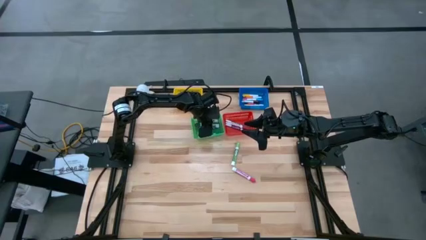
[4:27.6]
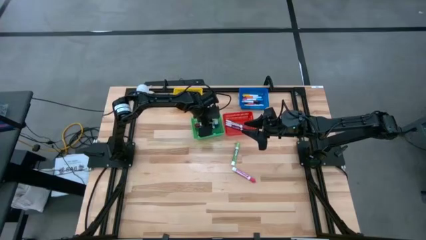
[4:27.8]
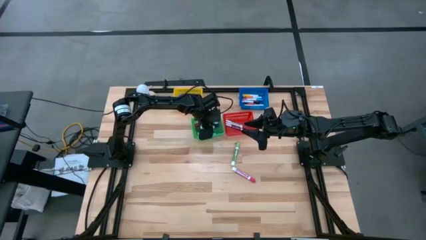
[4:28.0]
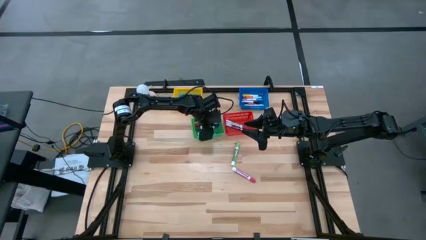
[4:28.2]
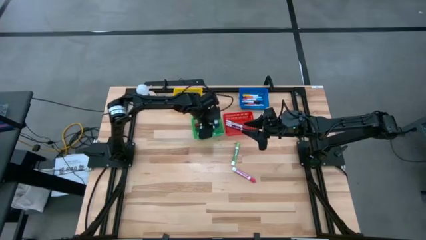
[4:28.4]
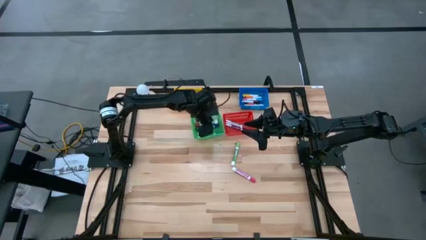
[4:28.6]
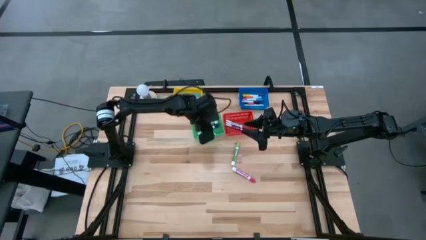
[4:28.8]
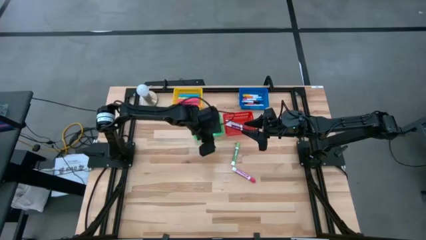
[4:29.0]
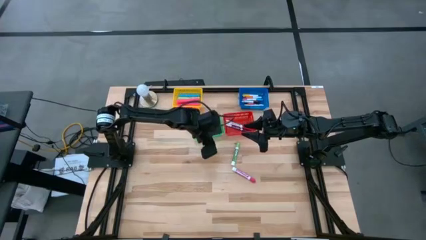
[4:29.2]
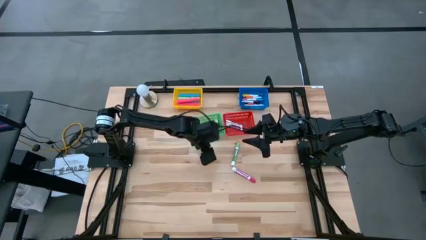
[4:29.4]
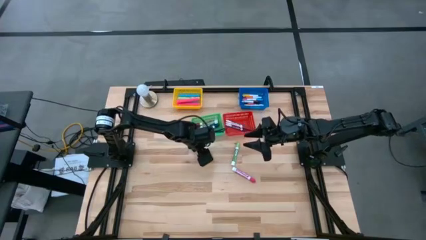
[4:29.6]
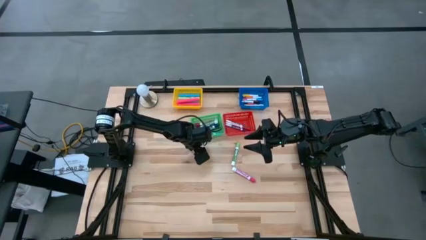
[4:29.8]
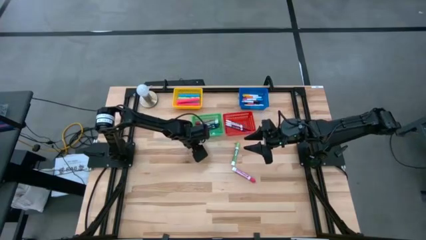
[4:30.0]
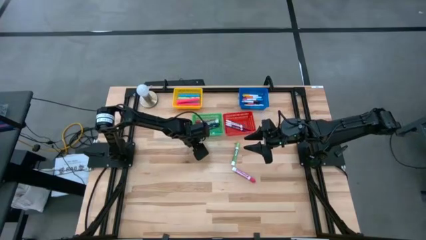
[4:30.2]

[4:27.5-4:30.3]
Task: Pick & Place Markers
Adjust the green bin

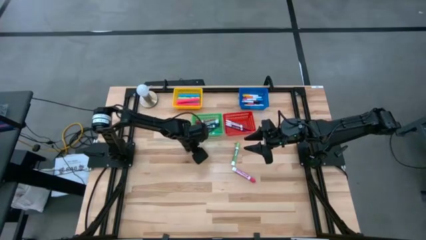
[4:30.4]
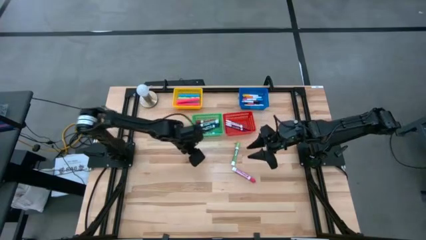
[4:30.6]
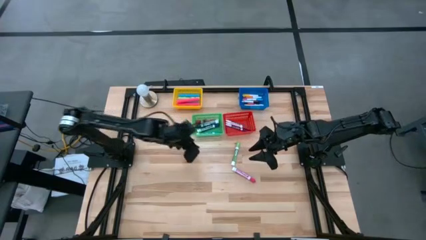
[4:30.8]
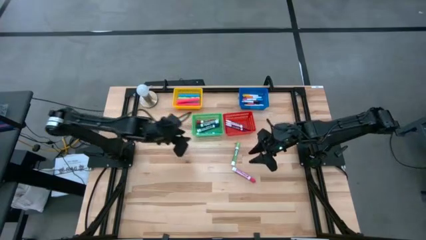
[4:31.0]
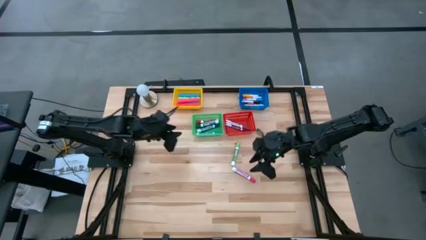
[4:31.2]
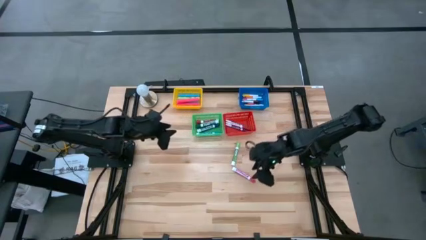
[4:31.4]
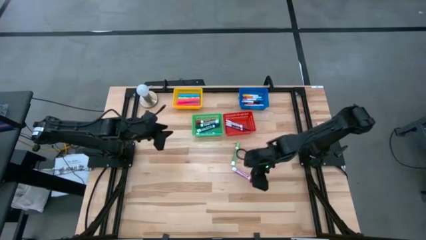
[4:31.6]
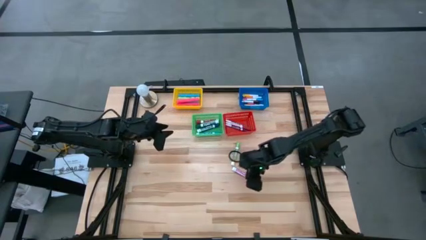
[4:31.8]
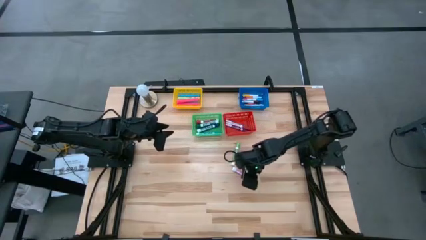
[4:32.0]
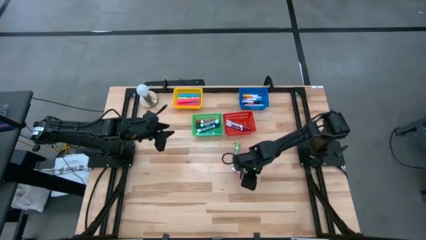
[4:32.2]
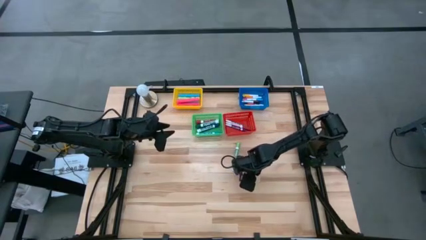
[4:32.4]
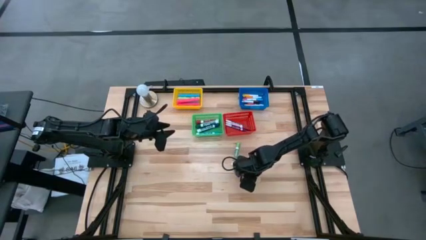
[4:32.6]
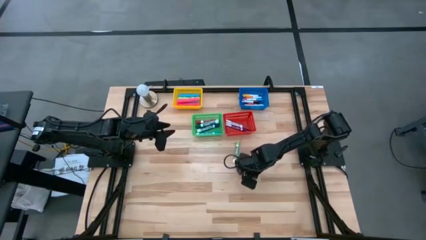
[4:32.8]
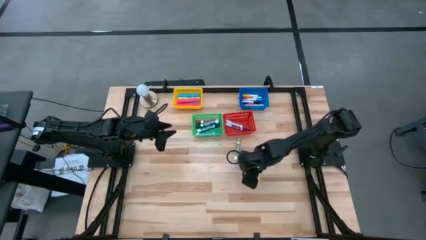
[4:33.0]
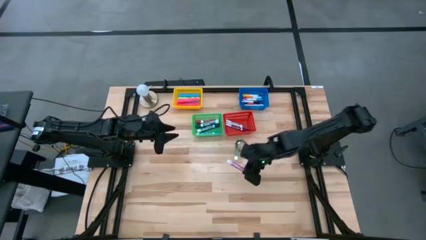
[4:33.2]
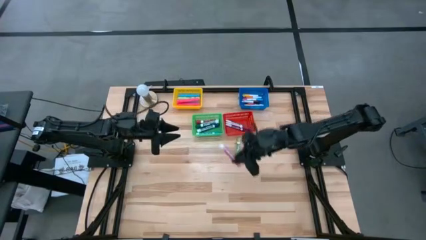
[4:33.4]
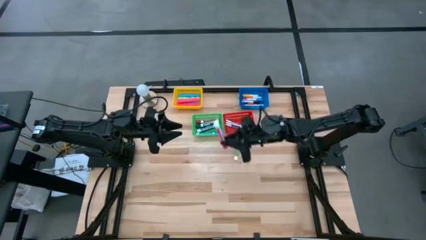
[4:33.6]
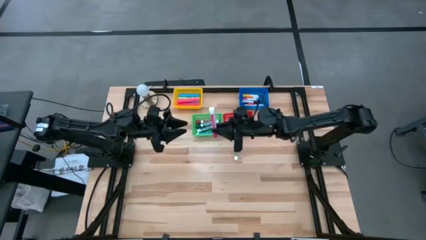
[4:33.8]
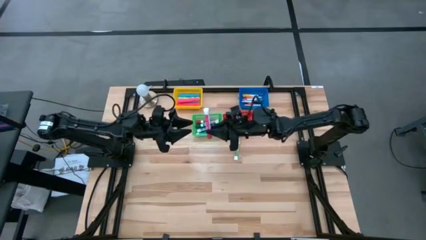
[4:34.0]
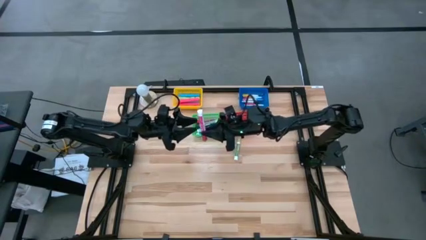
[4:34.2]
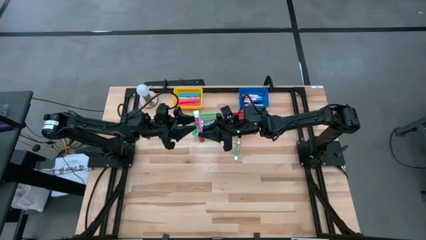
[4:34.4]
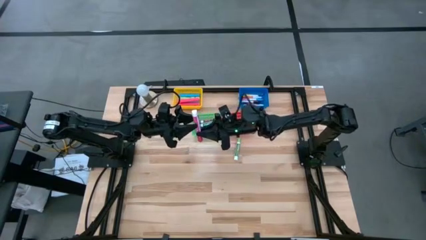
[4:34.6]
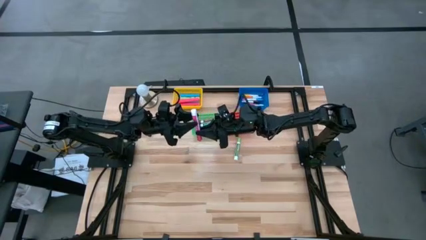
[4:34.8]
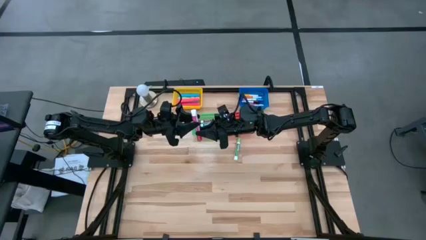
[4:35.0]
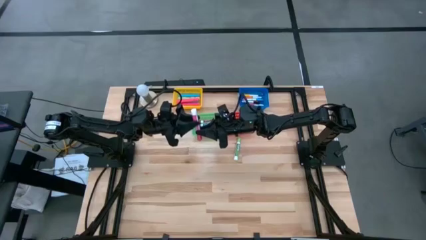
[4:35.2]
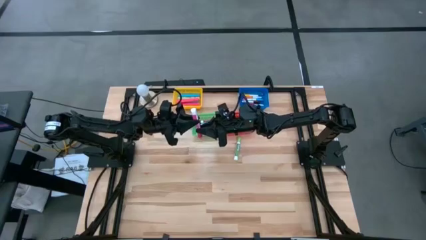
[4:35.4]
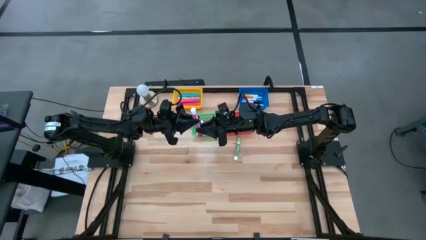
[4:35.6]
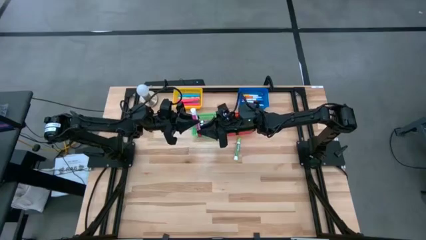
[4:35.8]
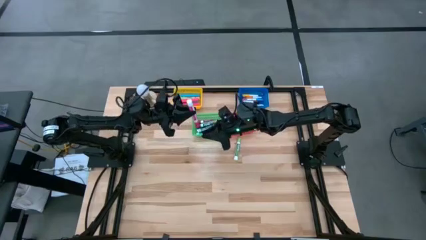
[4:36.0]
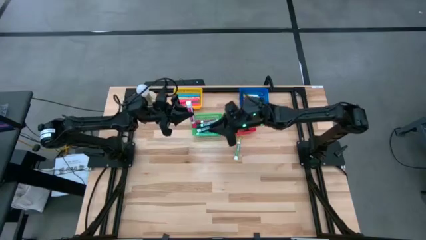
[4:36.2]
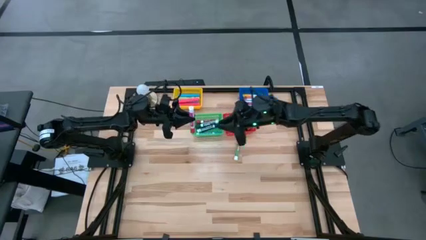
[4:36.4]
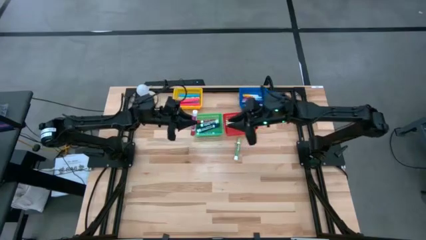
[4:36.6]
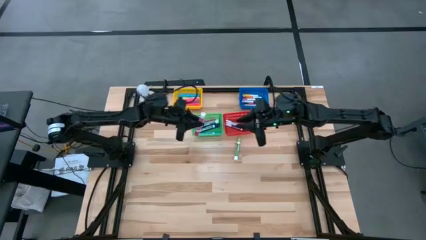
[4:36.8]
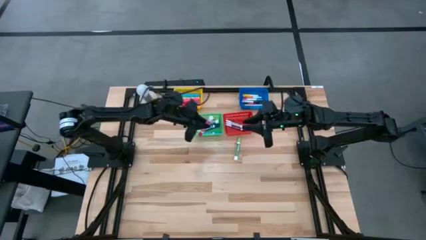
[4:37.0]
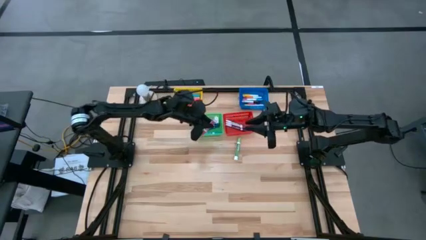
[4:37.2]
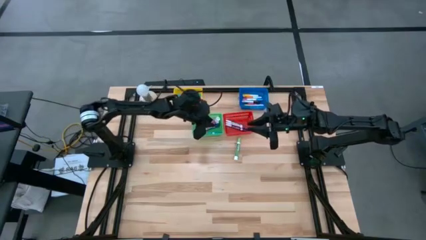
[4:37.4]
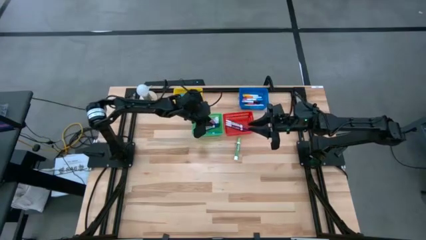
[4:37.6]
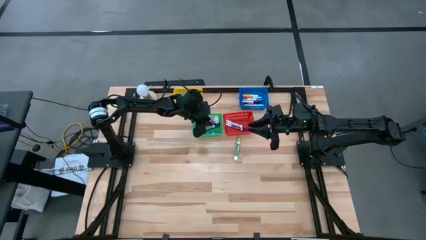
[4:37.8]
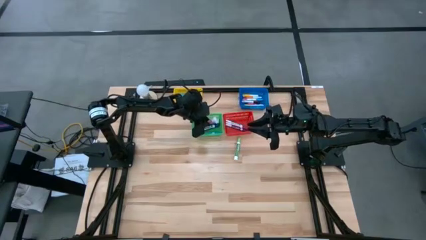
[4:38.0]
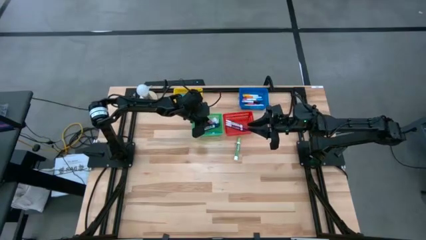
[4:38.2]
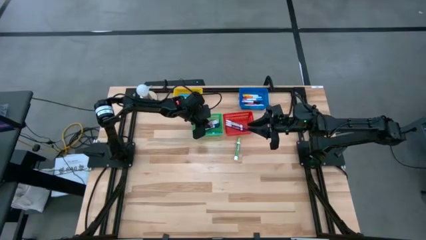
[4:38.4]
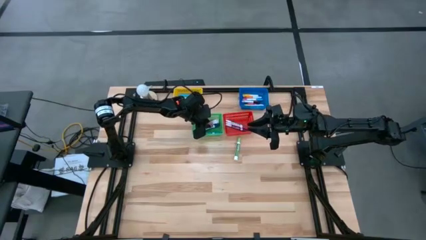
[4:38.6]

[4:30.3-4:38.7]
Put the large pink marker into the green bin

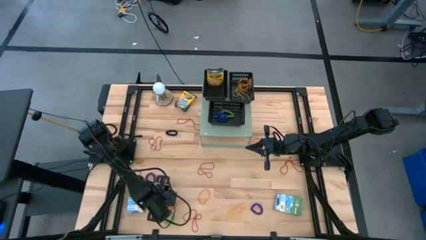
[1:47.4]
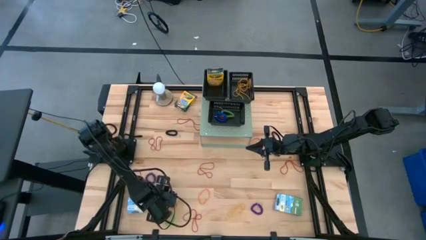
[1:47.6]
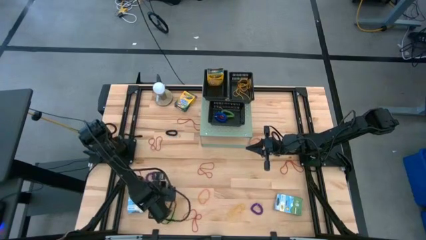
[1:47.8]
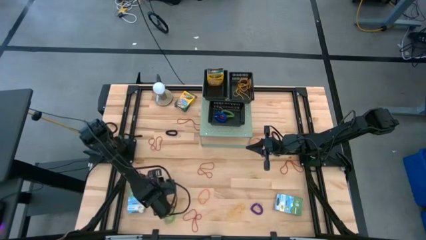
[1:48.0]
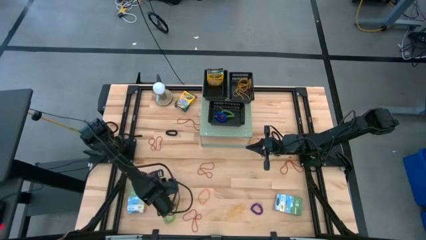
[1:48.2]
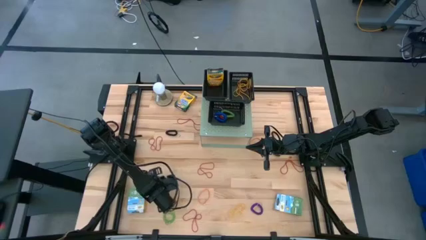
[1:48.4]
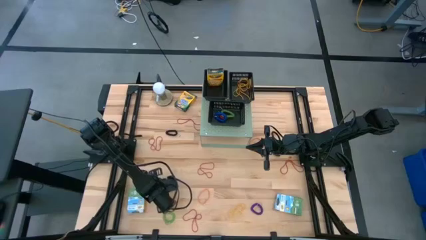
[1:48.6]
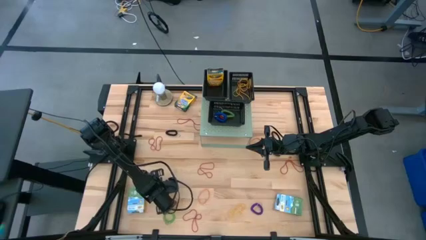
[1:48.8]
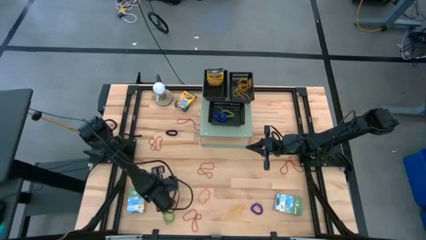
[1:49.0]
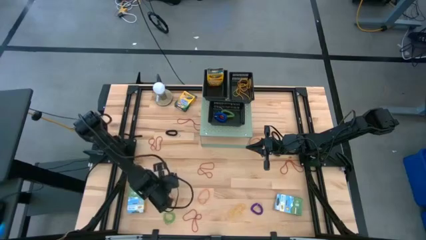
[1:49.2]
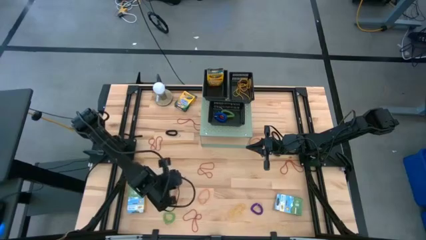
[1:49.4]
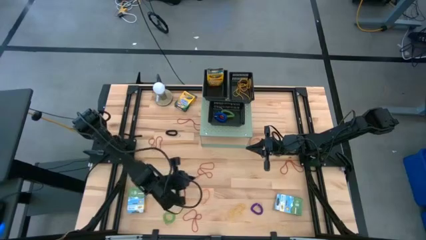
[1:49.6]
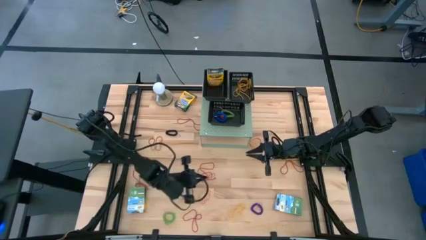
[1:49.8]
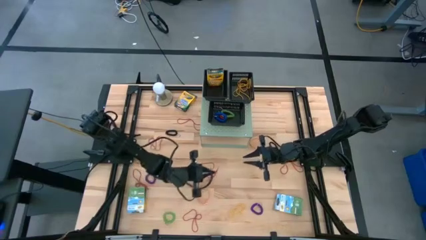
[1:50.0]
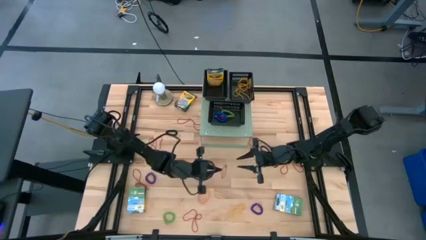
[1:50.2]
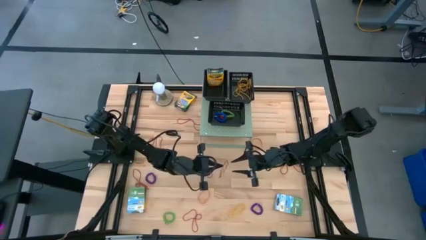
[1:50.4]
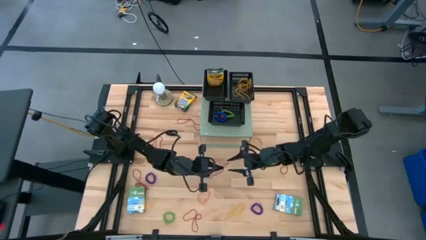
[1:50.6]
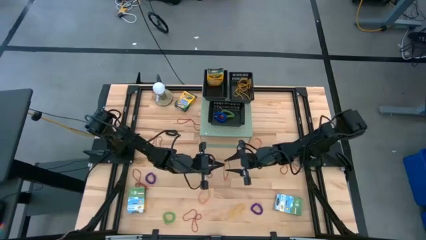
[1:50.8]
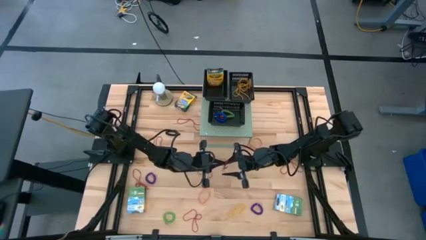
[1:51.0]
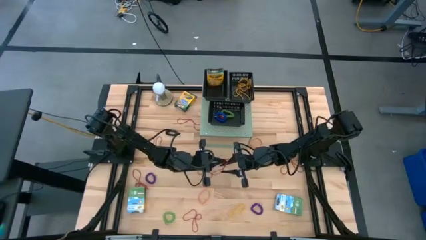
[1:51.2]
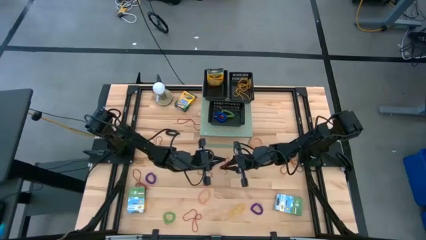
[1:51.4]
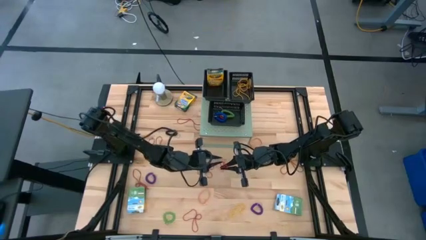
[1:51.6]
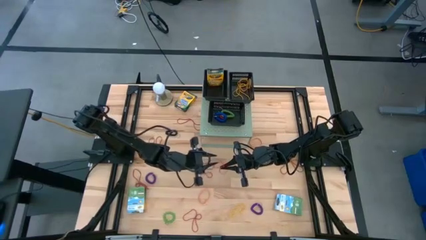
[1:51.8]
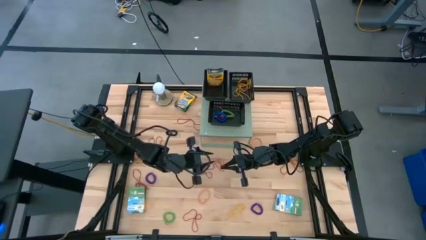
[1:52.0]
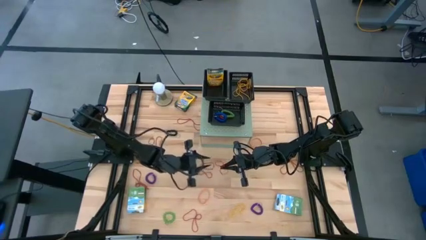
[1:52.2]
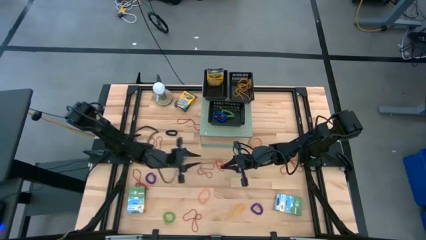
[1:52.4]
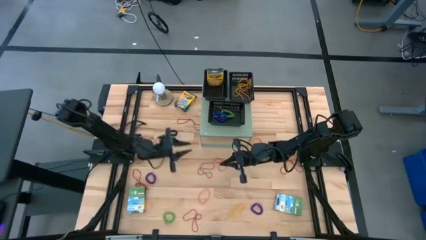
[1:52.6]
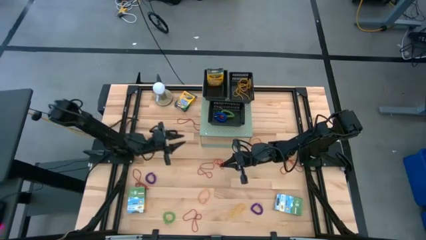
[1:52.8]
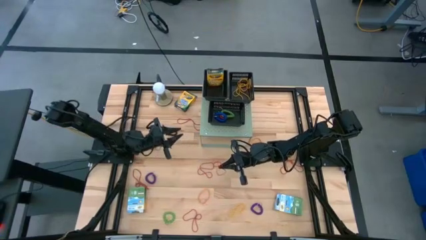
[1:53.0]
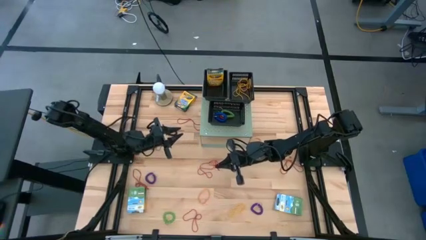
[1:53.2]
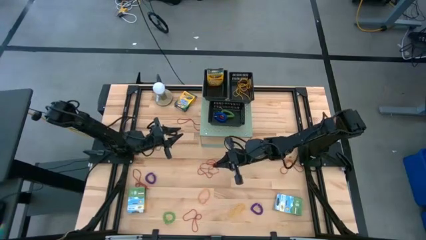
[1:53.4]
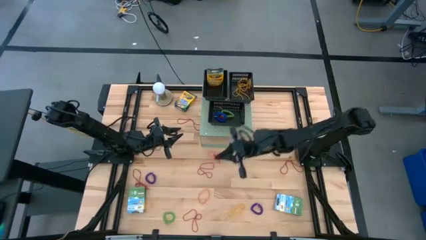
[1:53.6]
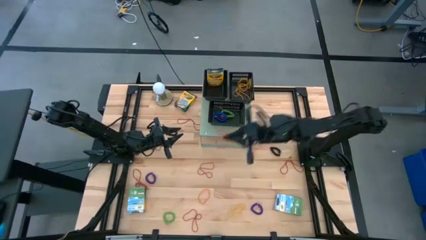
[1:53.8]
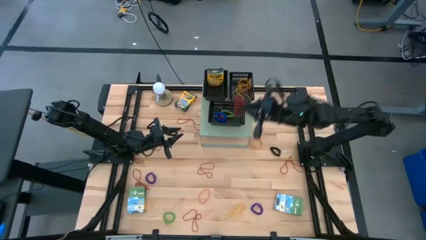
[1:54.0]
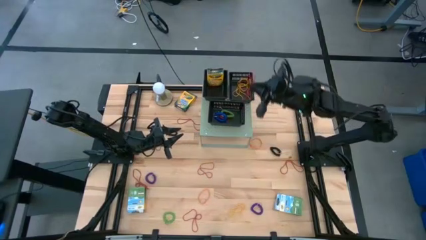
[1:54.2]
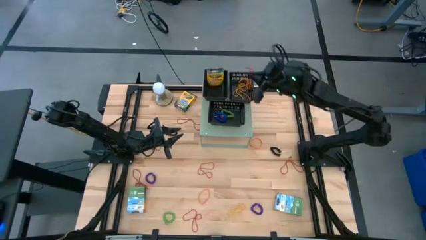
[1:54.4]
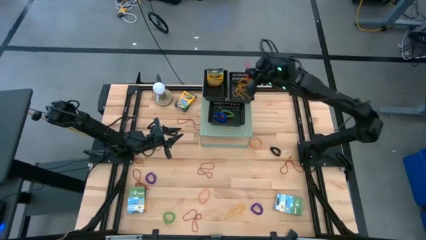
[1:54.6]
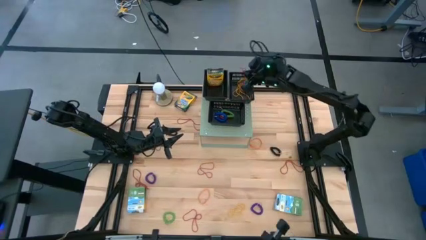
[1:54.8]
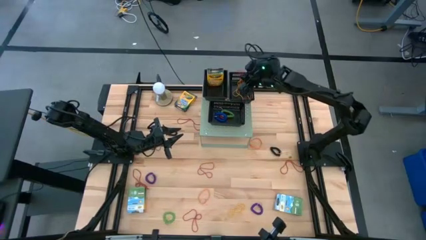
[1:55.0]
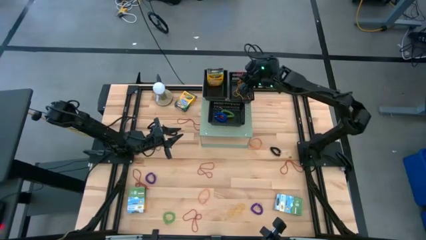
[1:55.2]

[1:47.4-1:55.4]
Task: Pick & Place Office Desk Supplies
Put the red rubber band into the top right black bin on the shelf
